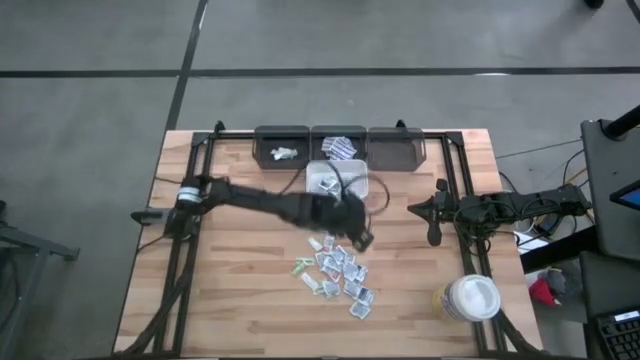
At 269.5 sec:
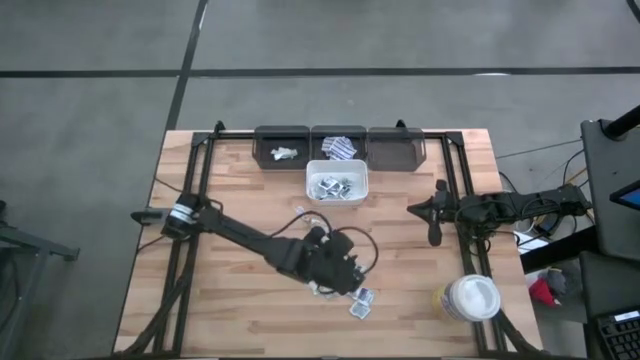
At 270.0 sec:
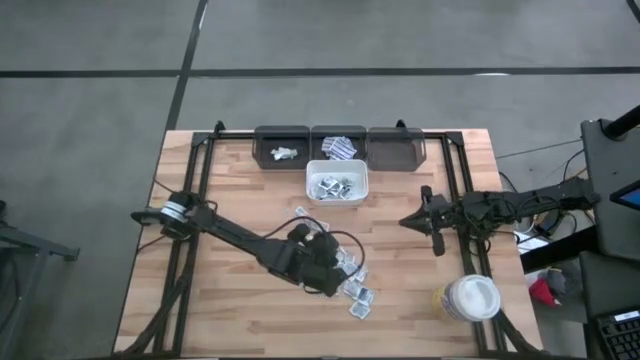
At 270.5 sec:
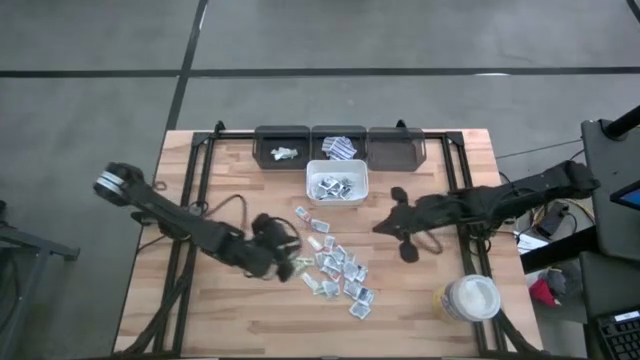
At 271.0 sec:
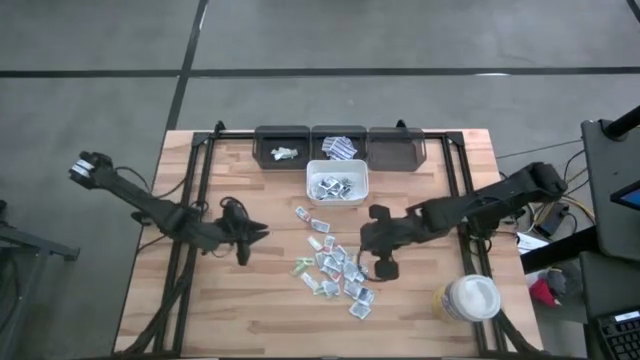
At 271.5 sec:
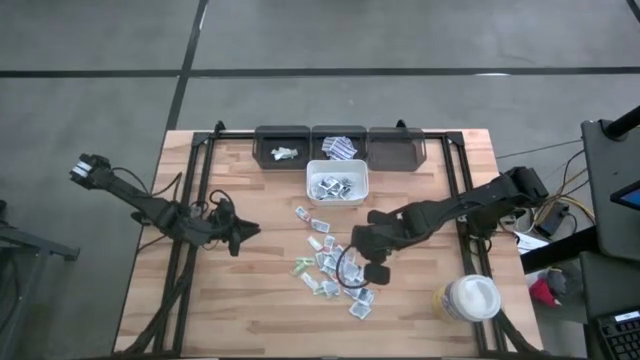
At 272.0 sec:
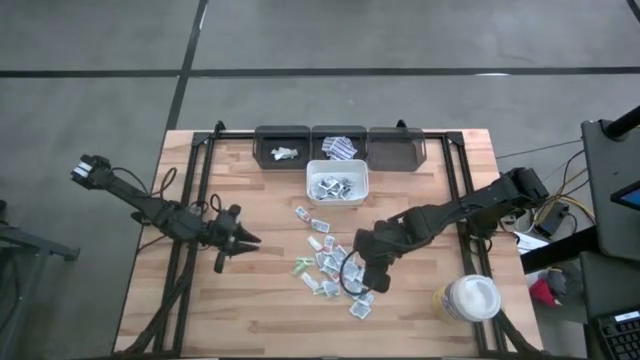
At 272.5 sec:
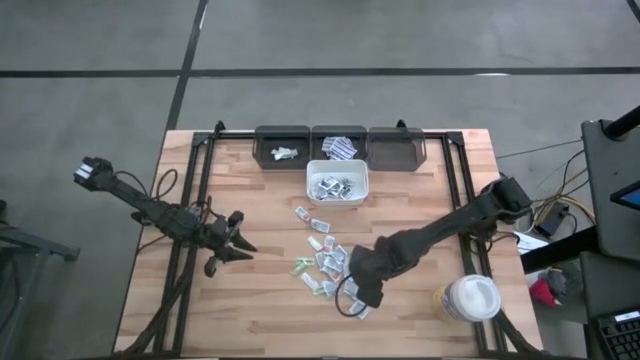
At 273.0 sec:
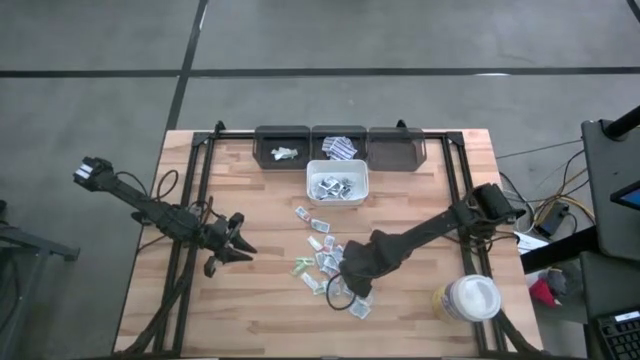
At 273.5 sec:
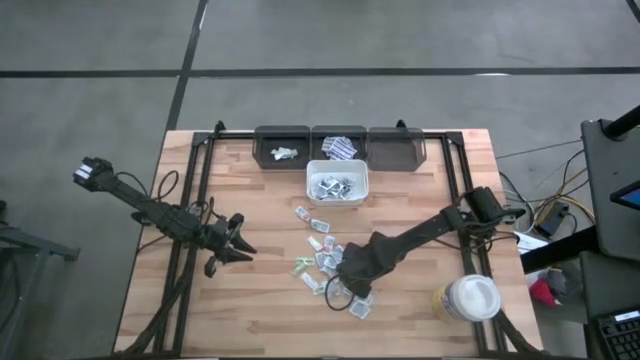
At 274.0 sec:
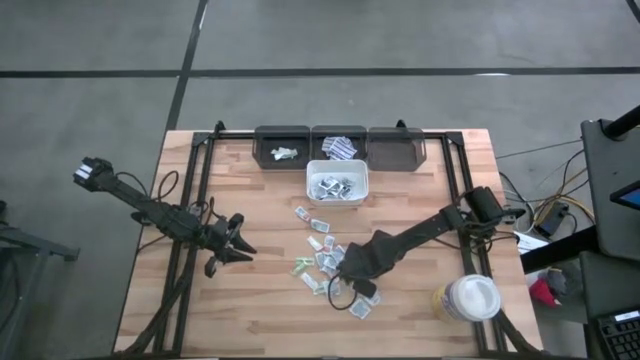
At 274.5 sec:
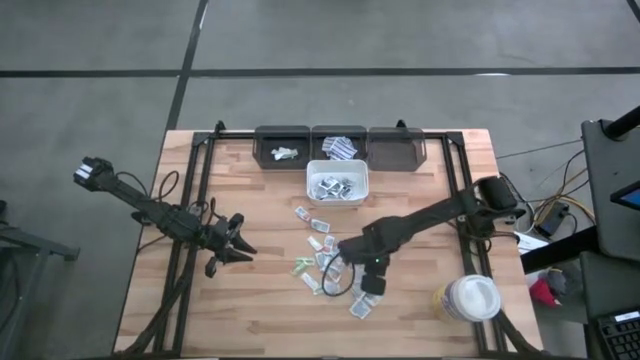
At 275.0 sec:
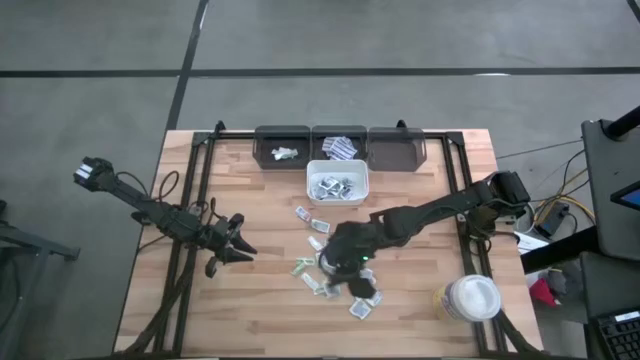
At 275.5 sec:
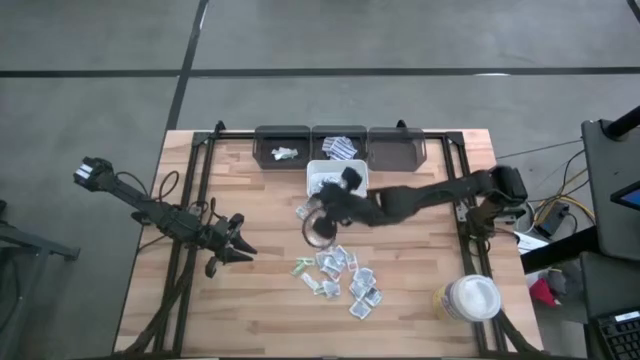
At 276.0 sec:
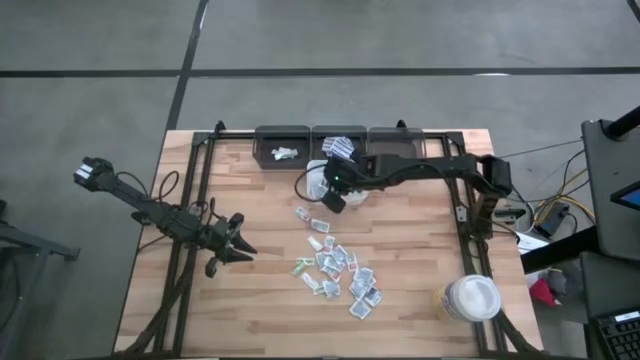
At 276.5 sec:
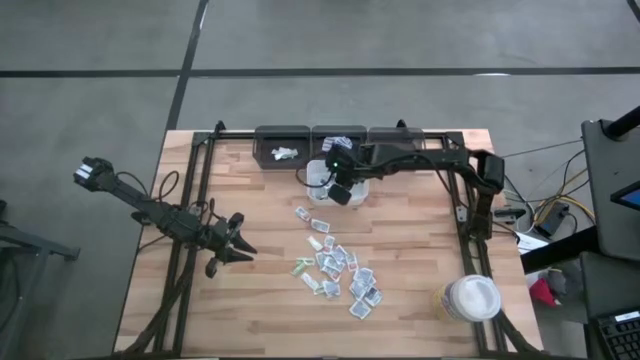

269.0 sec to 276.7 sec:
Task: Pick & Place First Aid Supplies
Put the blue alcohol pad into the white bin

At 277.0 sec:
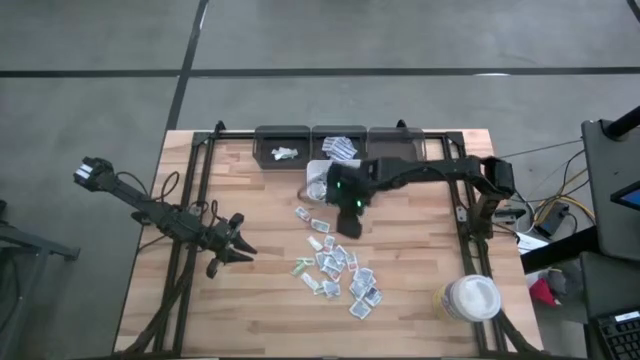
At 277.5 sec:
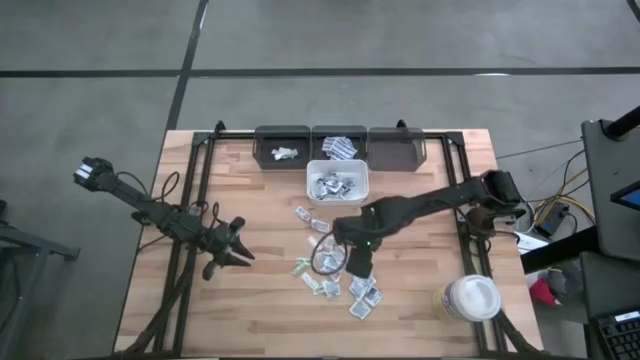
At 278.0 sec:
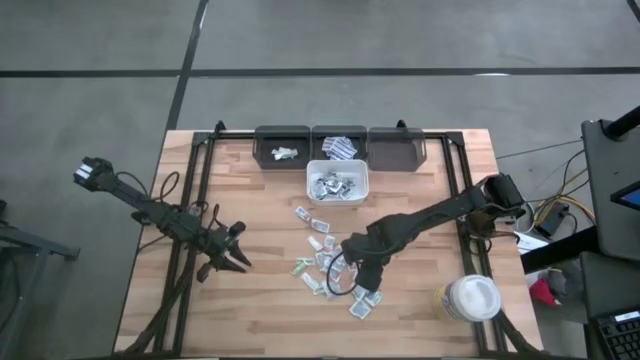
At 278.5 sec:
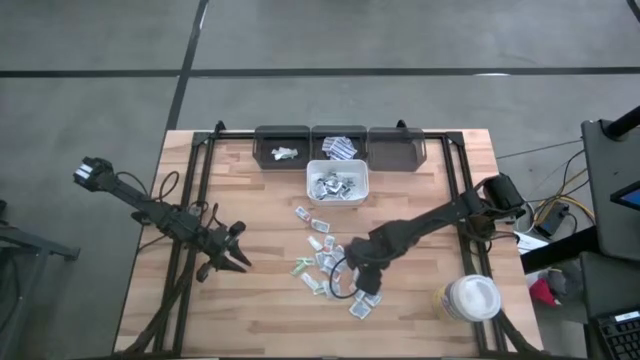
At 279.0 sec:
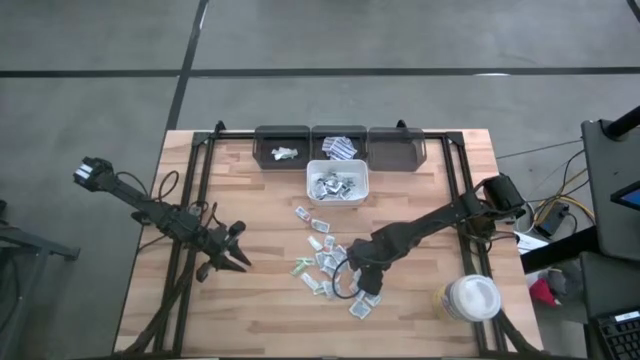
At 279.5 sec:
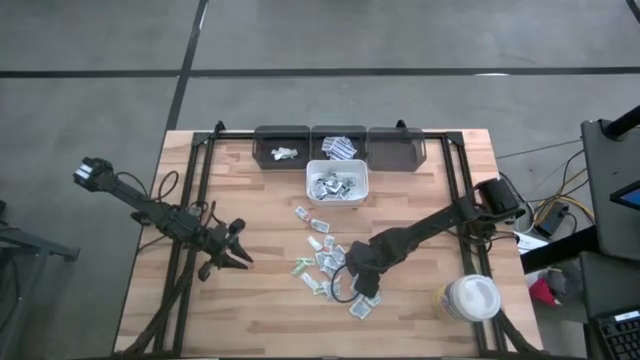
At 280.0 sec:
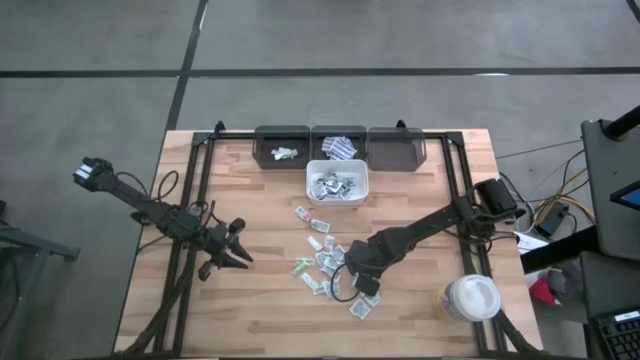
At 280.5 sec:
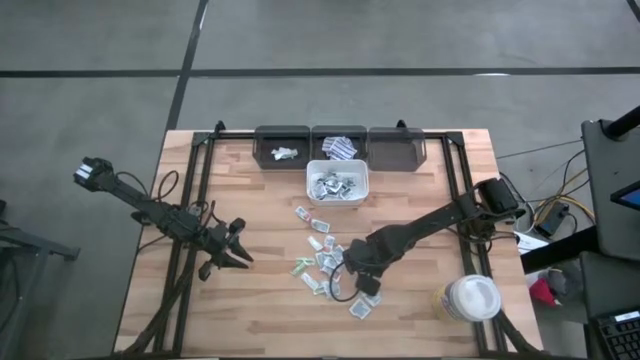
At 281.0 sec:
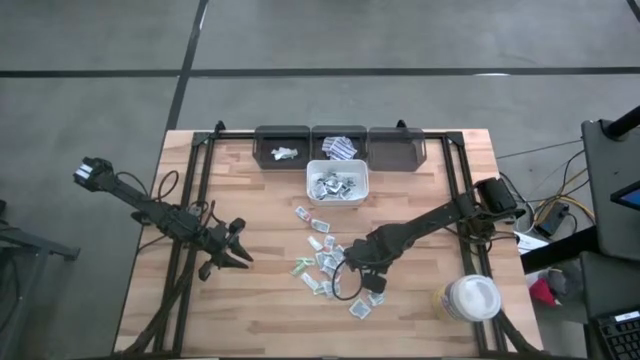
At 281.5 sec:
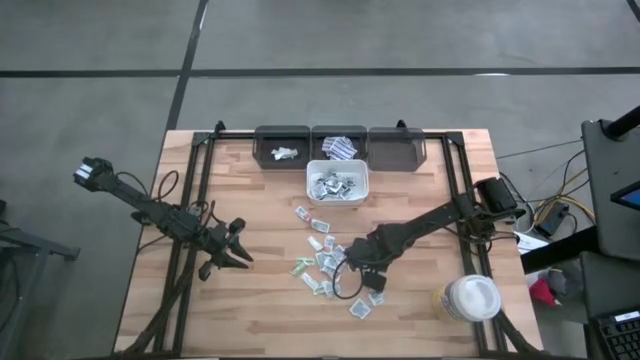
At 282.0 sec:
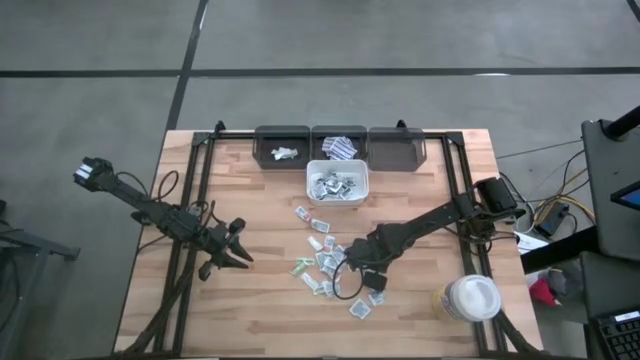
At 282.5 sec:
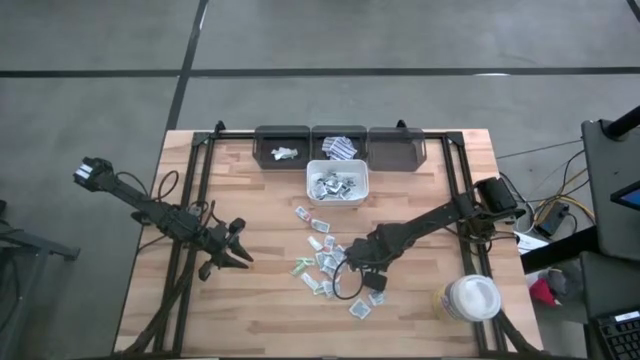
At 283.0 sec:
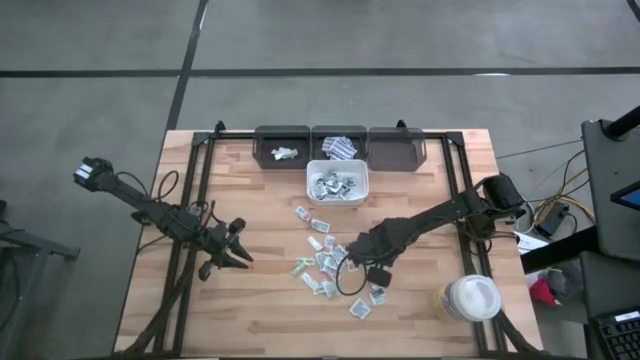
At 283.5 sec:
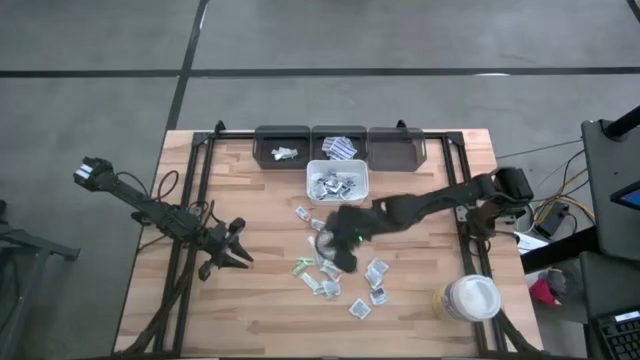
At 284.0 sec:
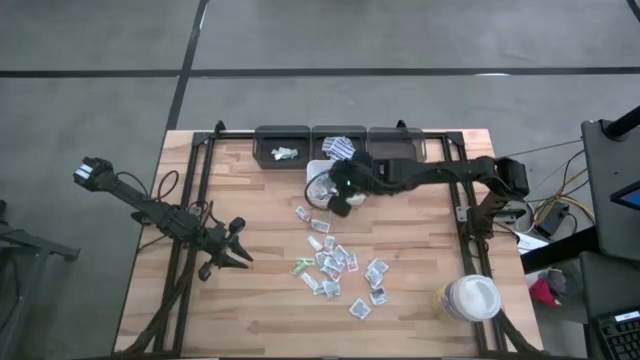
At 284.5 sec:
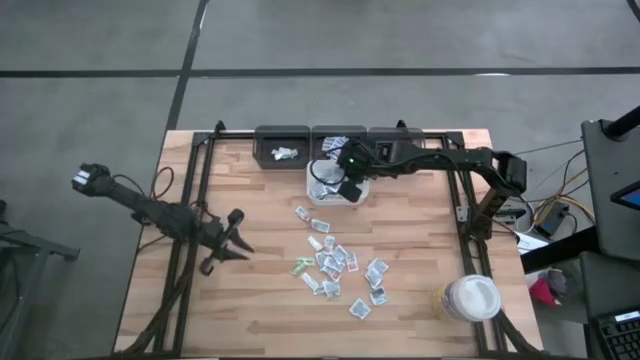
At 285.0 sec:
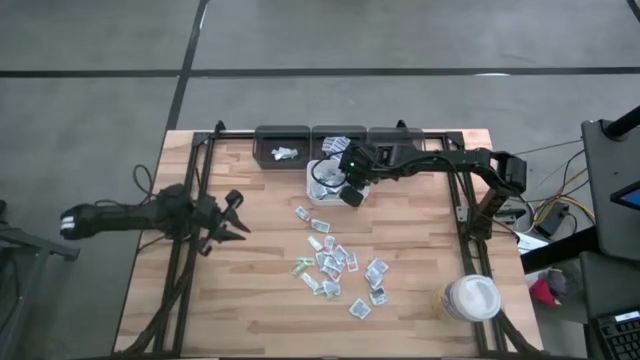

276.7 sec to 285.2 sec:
Put the blue alcohol pad into the white bin

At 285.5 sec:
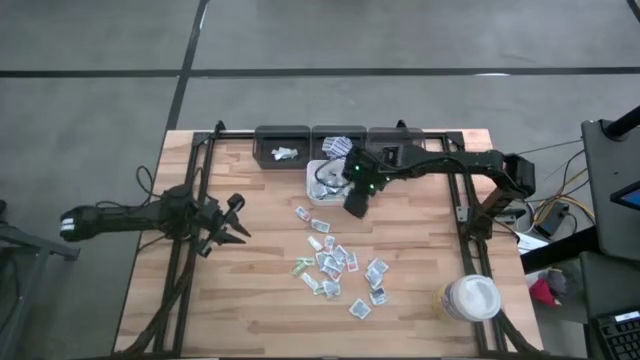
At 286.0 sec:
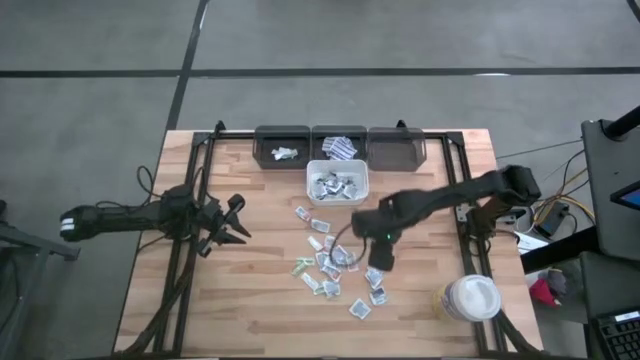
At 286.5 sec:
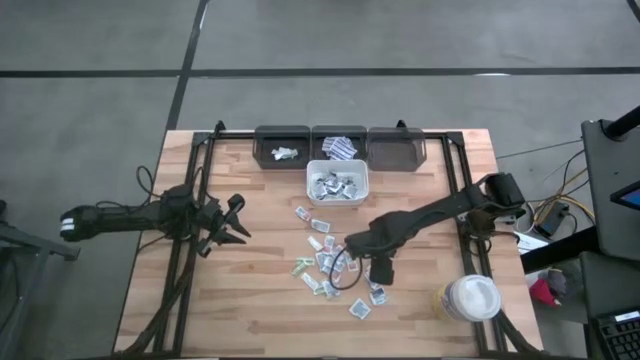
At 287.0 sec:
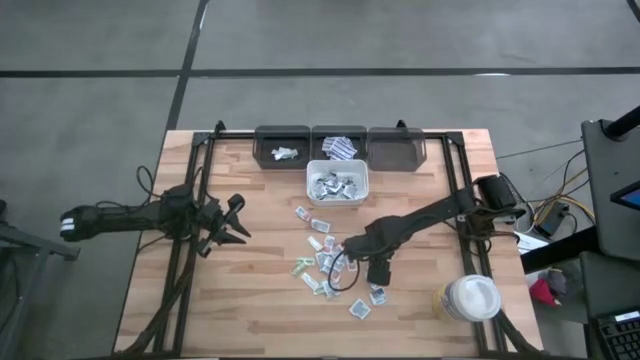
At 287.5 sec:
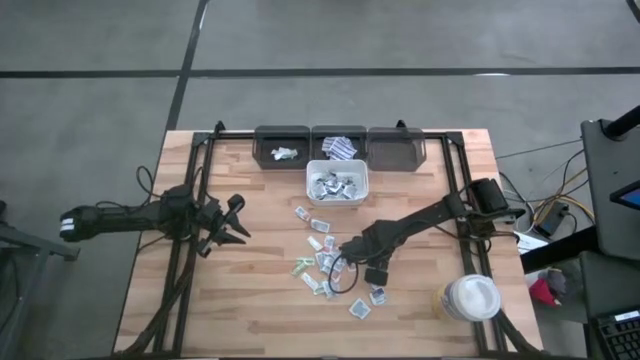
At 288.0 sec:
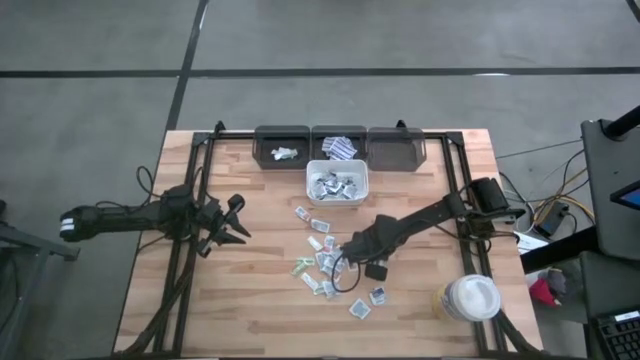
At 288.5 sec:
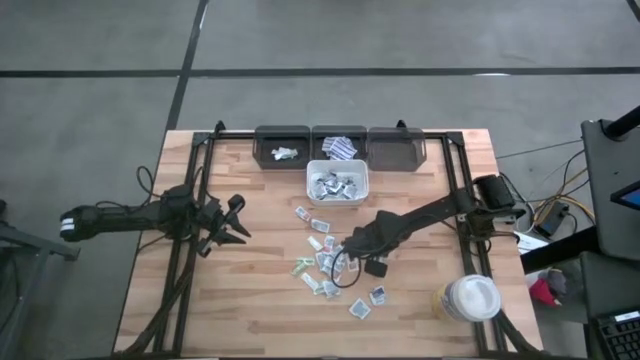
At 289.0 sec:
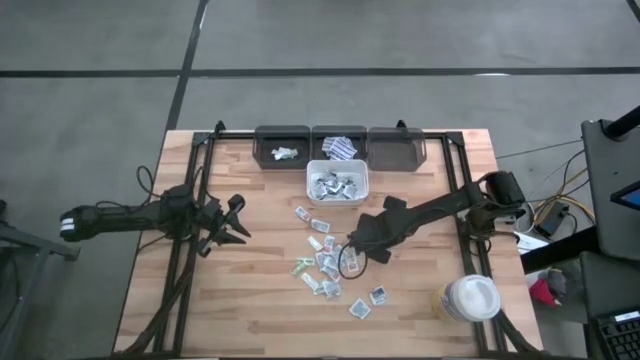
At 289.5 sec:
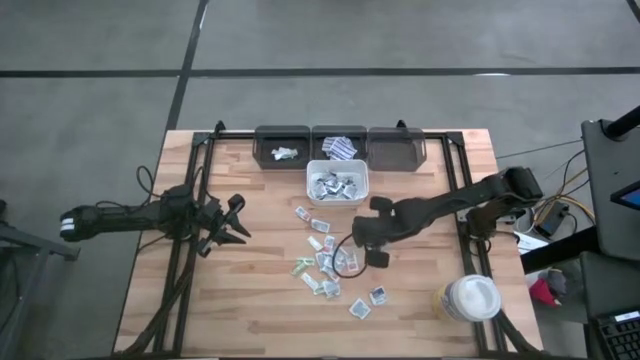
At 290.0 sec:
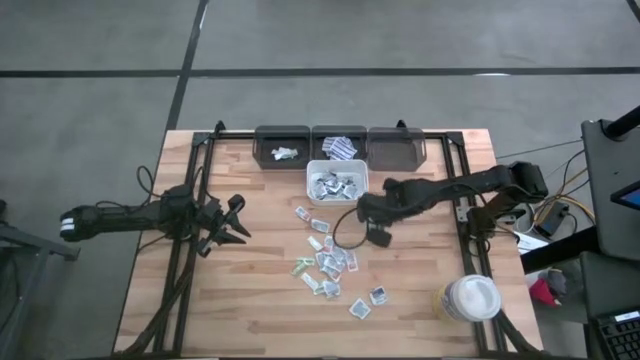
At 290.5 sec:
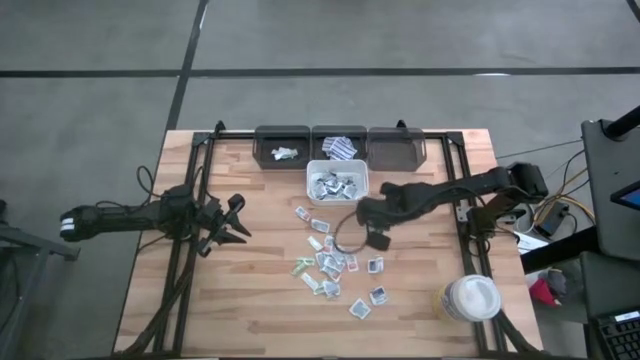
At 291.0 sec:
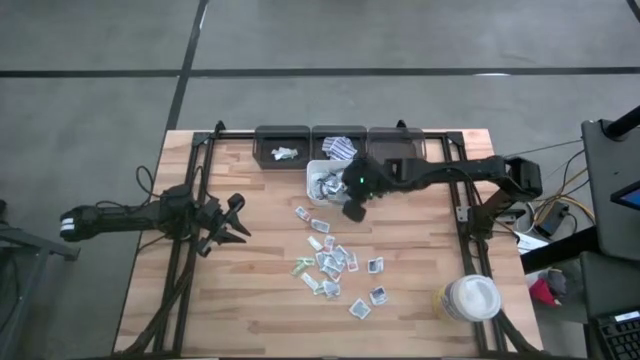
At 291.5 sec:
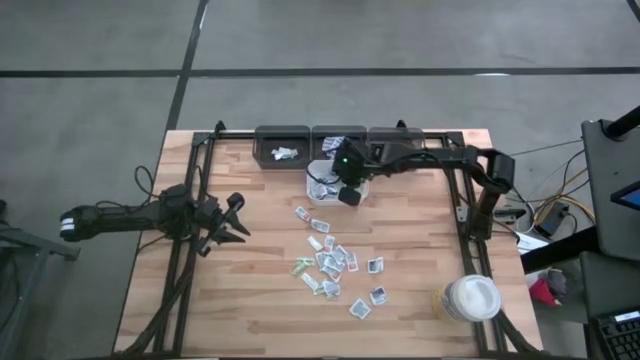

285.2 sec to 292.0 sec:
Put the blue alcohol pad into the white bin
